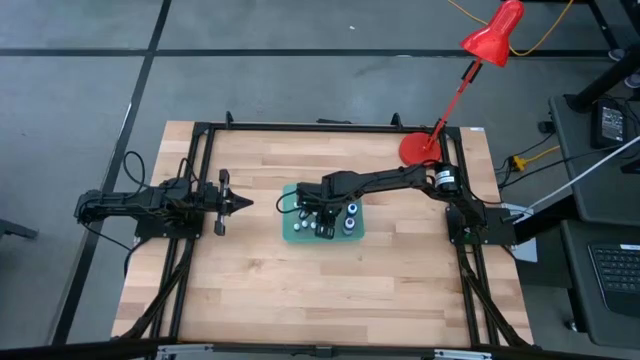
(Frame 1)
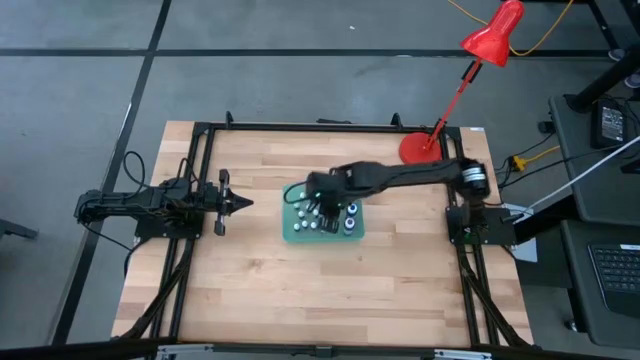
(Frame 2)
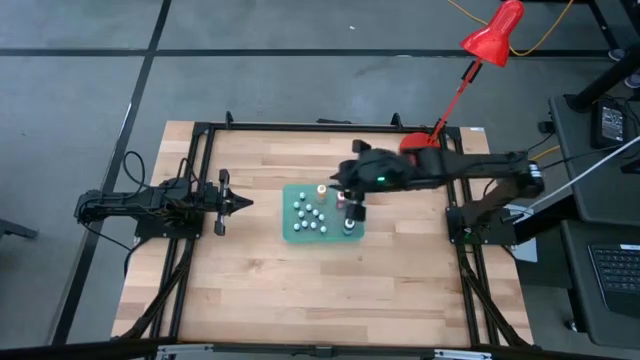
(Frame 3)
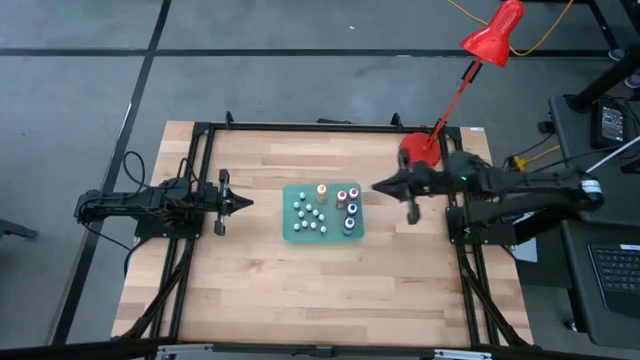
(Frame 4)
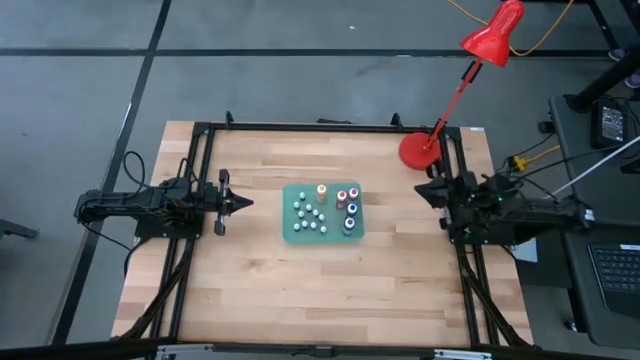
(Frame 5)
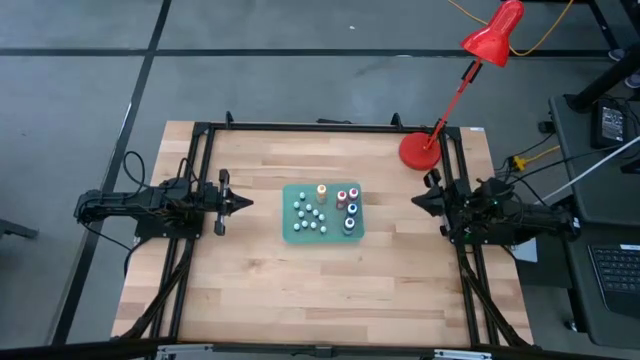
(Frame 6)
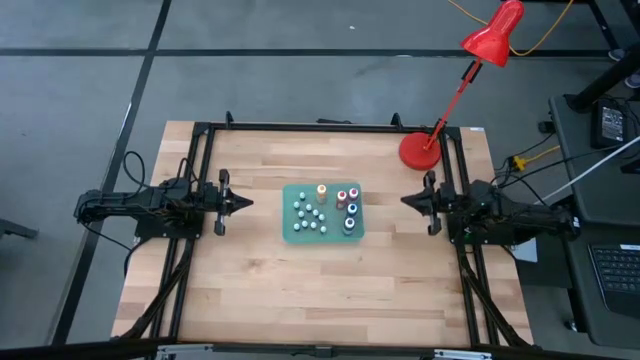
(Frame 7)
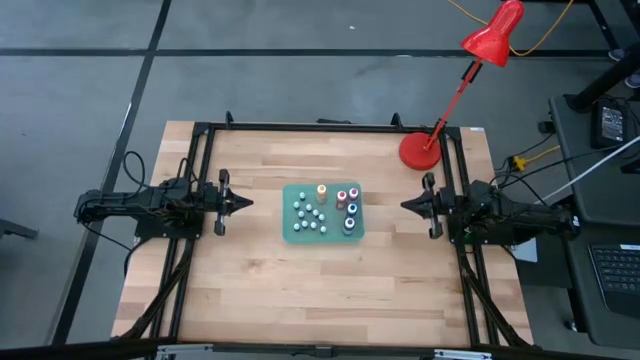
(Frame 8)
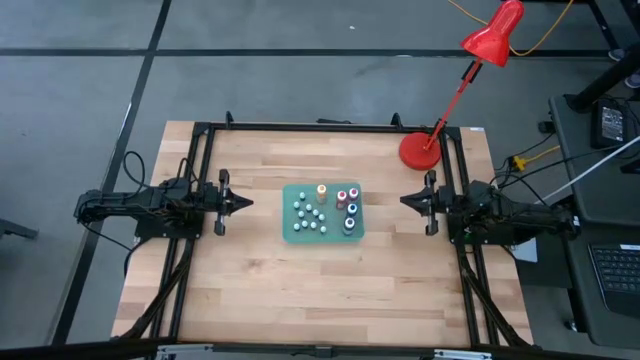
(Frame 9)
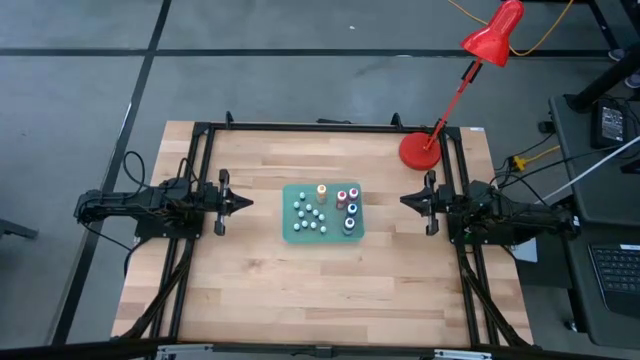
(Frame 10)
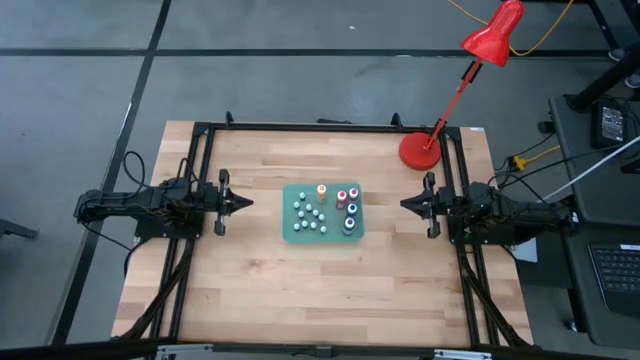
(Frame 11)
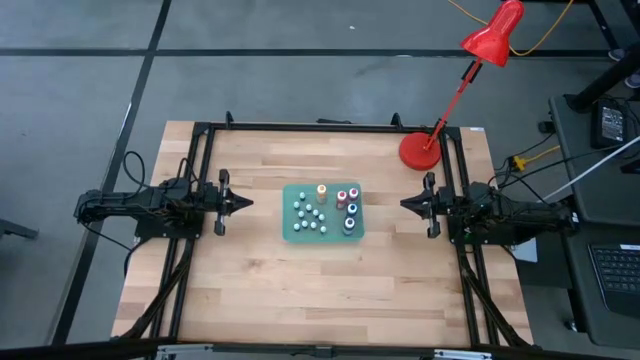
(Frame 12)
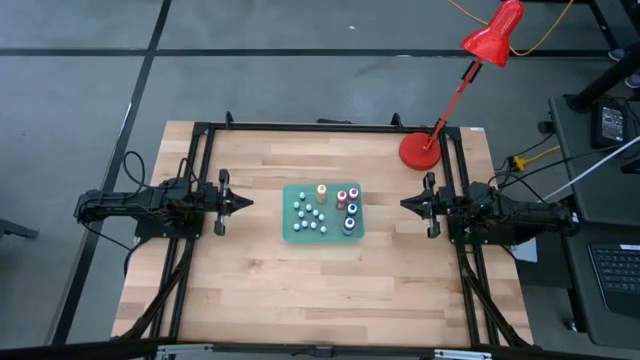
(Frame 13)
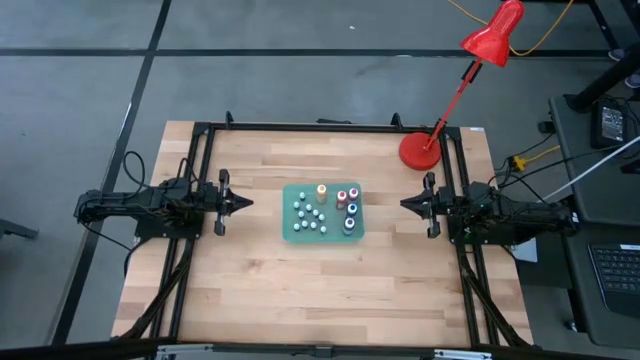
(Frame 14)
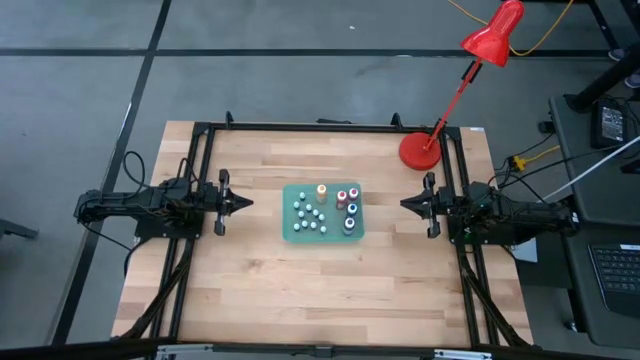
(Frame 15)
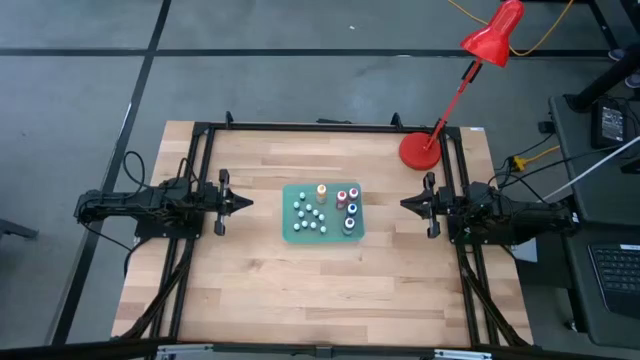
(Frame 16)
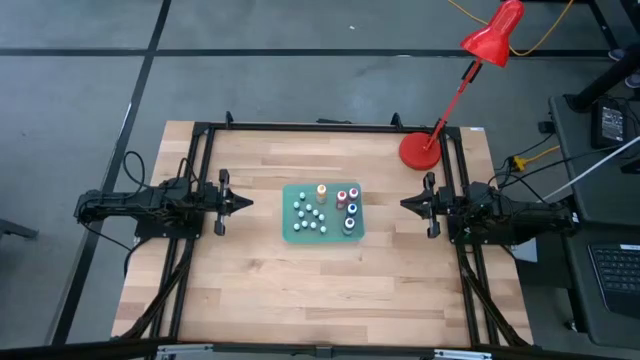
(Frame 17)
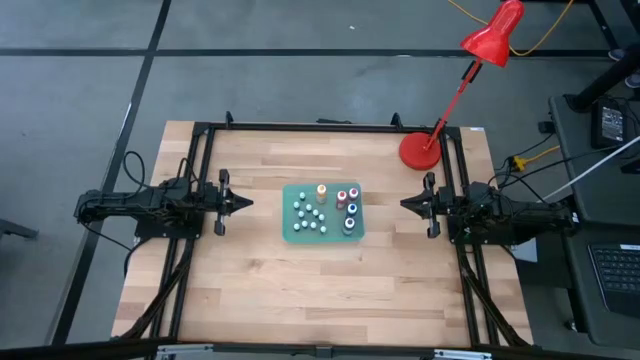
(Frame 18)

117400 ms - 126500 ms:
Task: Pick & Place food coloring
Return to Home Position

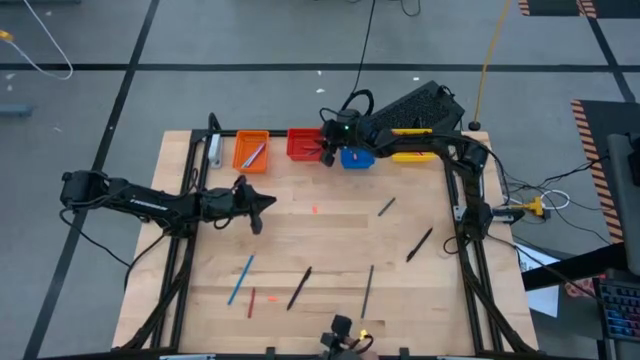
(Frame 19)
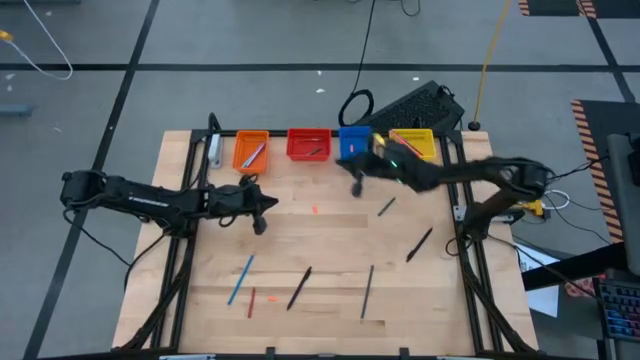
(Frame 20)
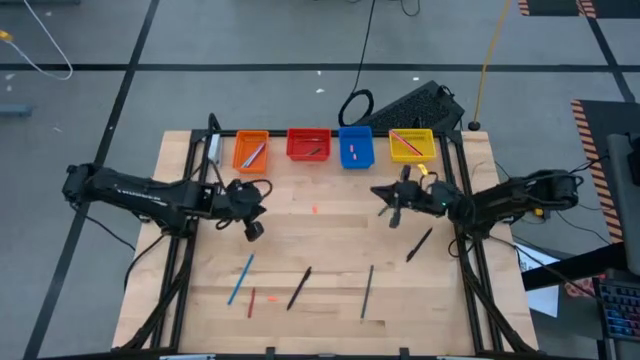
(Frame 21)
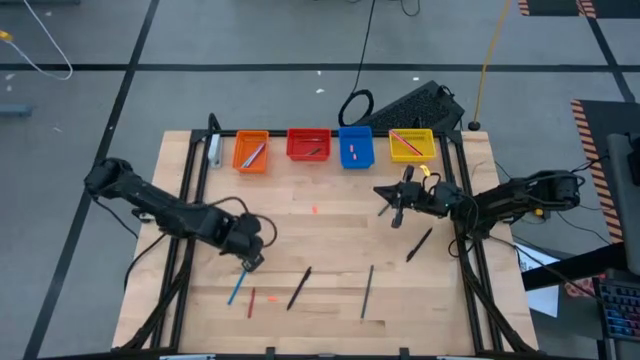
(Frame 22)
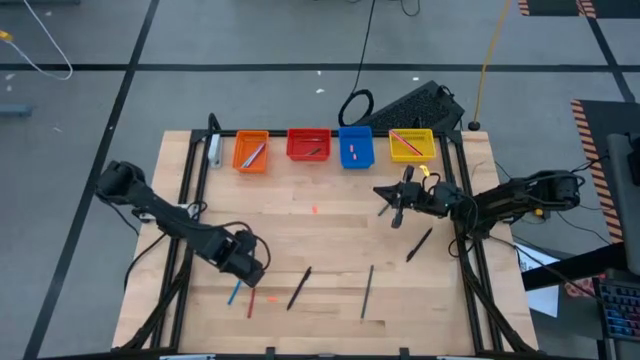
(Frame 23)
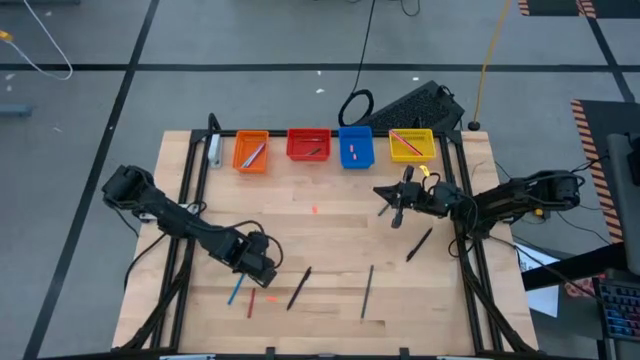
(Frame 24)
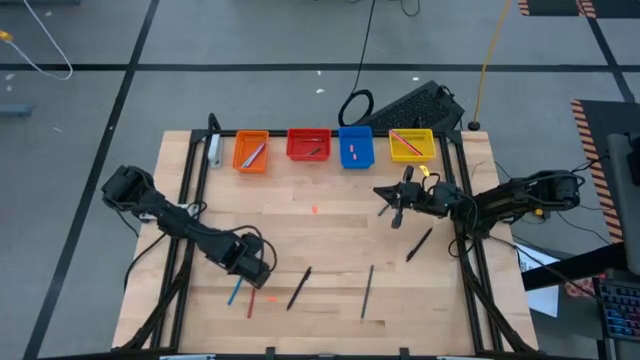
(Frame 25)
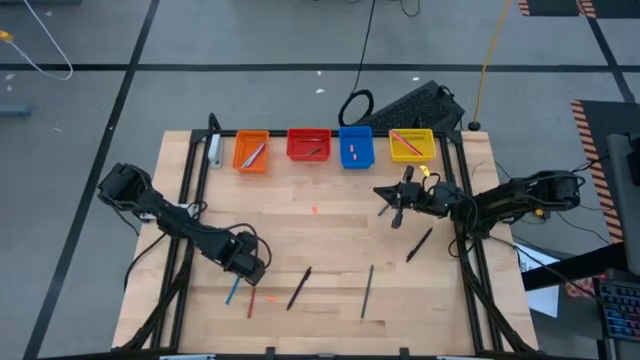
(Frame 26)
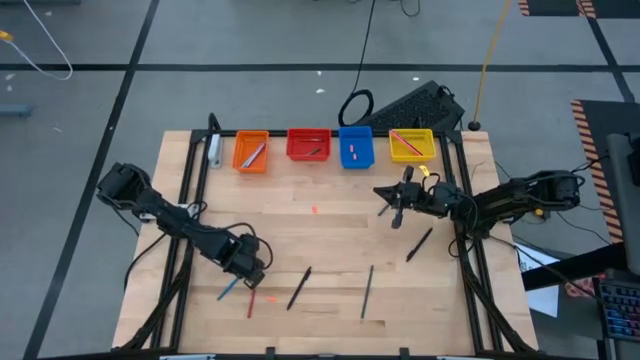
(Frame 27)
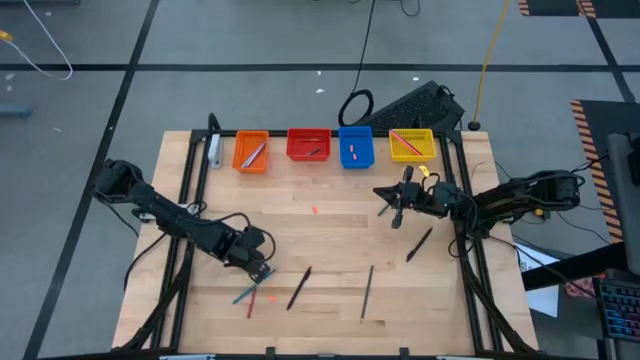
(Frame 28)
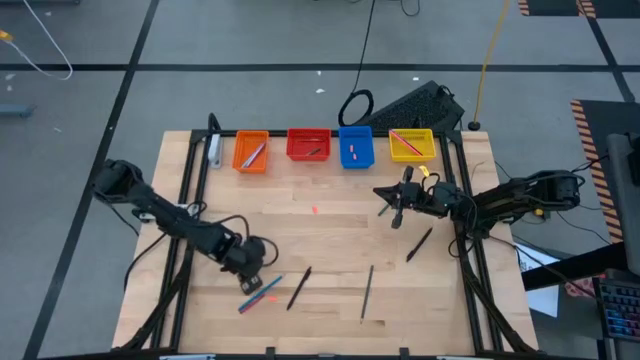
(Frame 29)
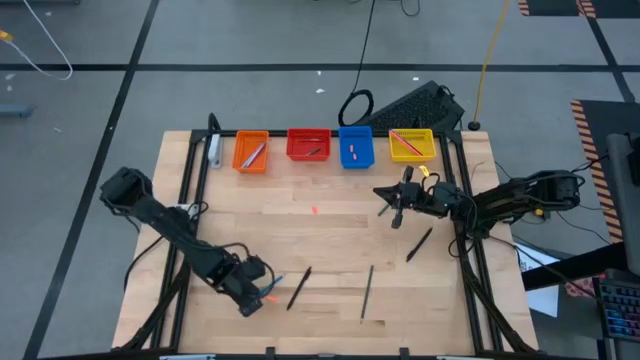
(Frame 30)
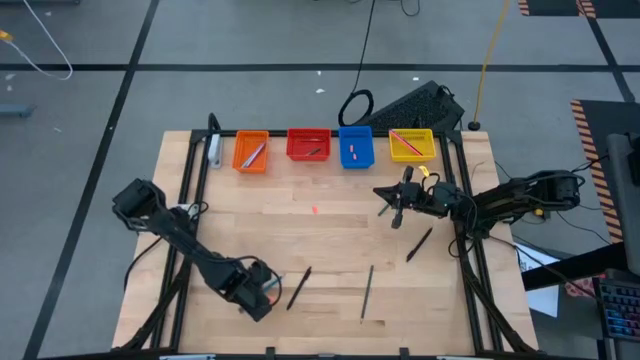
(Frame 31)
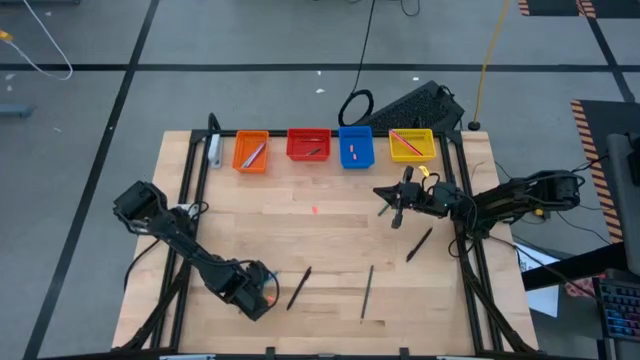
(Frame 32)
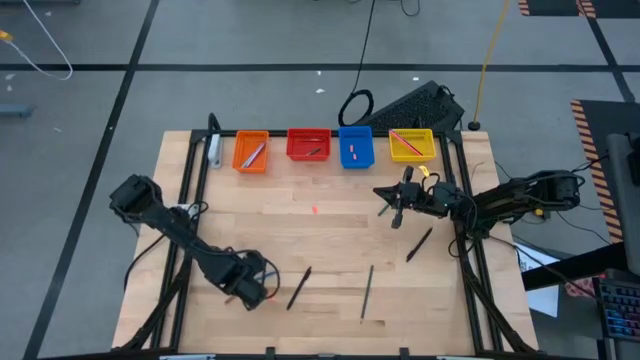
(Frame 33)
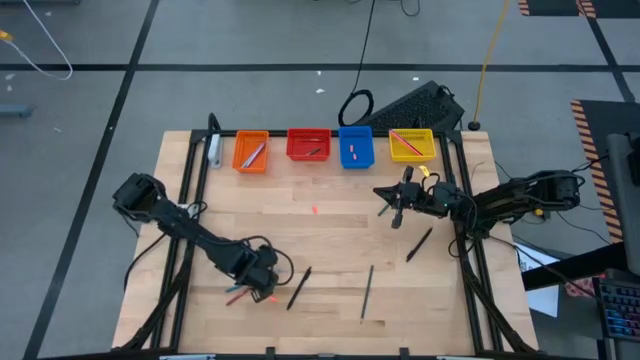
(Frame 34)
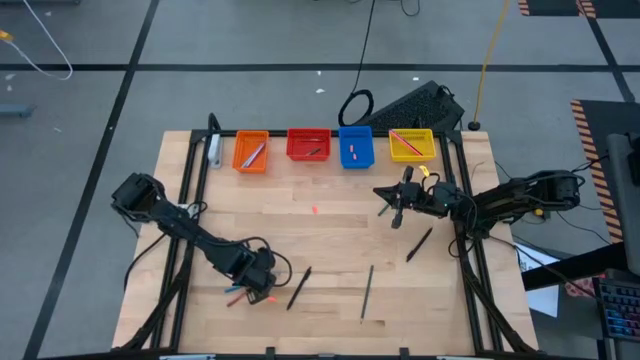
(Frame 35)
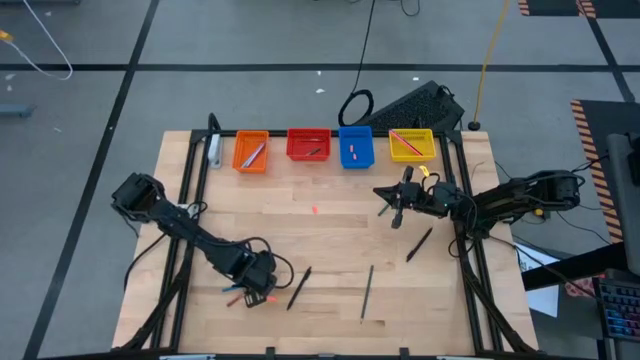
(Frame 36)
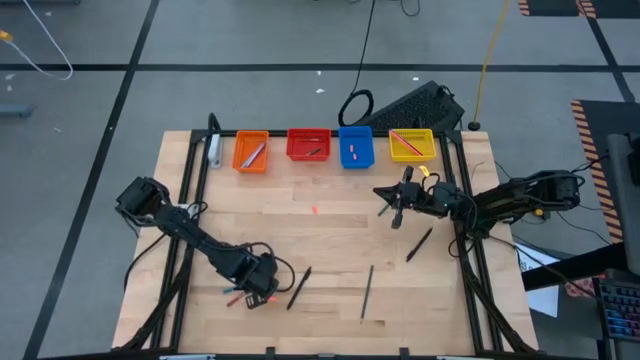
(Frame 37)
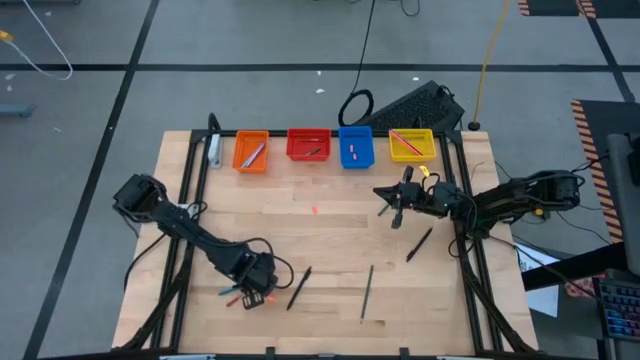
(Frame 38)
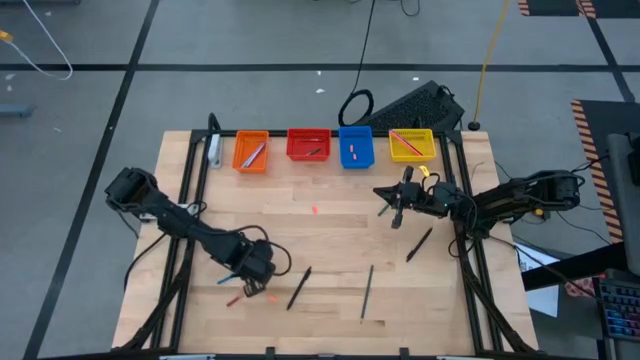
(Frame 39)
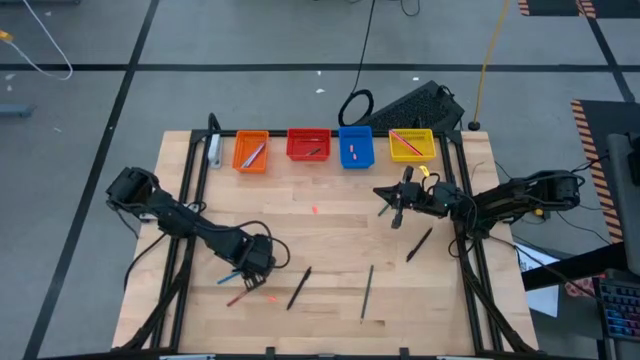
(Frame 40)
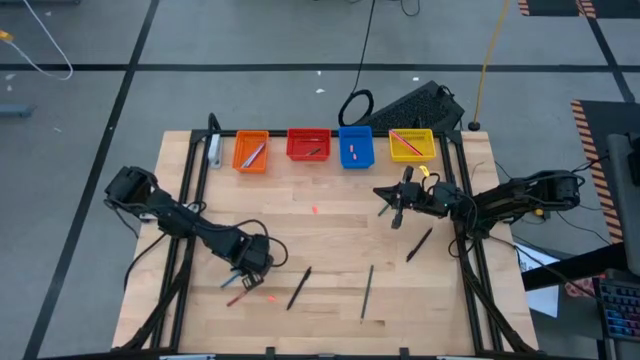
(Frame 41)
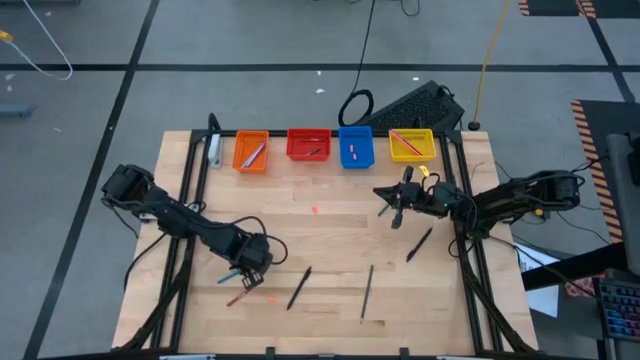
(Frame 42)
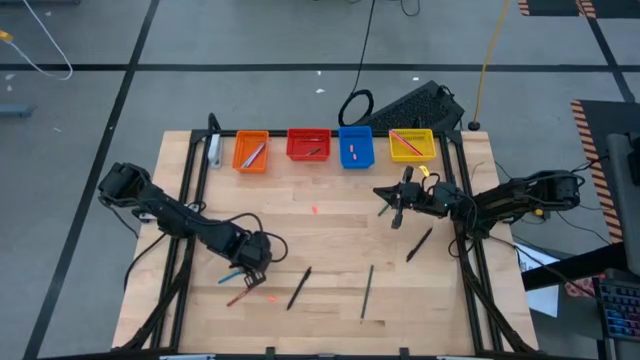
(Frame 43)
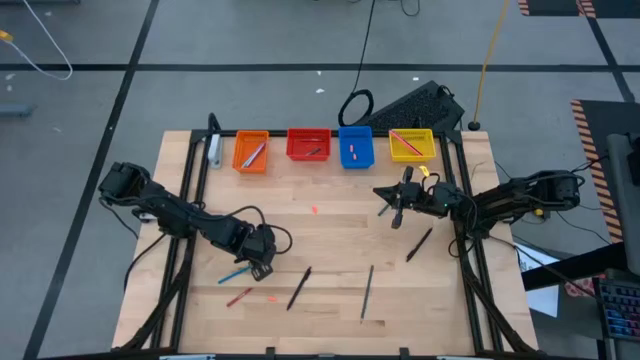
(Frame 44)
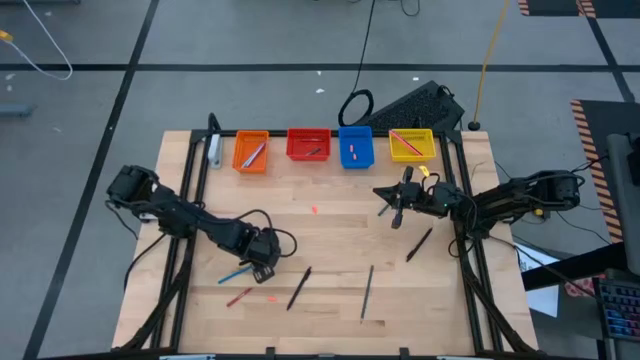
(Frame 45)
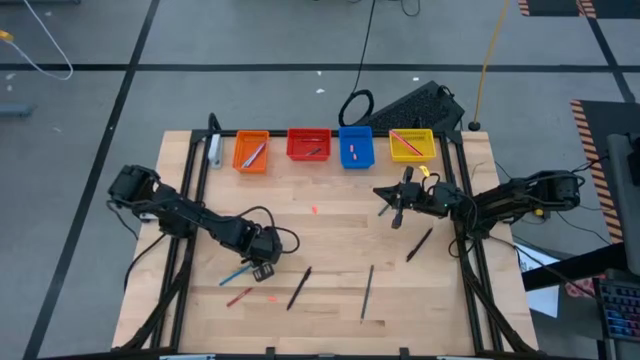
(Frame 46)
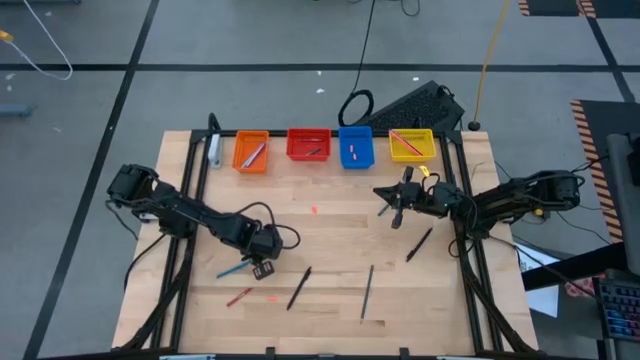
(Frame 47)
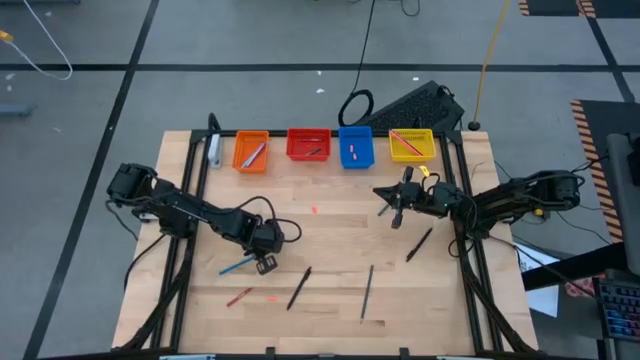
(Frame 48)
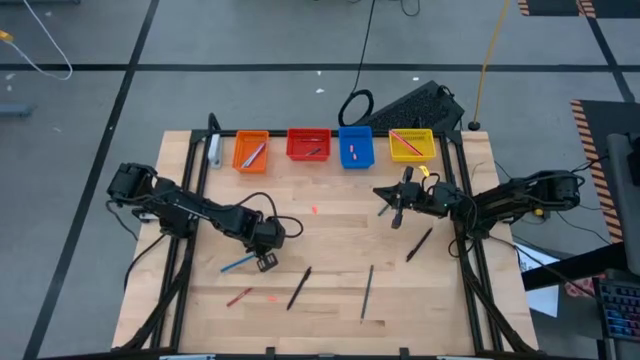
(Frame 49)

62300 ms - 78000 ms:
Task: Sort crayons/erasers/pens/pencils in bins
Put the blue pencil into the yellow basket
